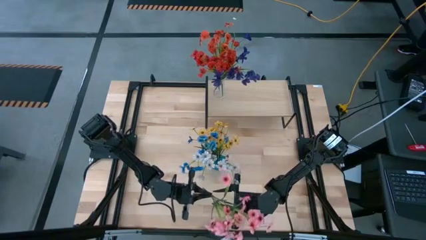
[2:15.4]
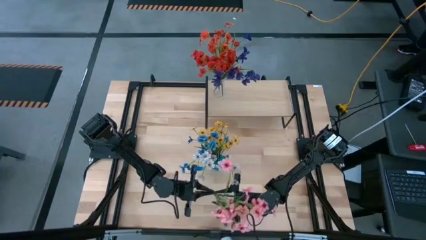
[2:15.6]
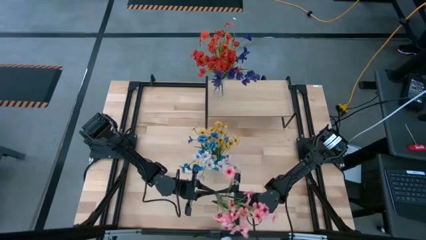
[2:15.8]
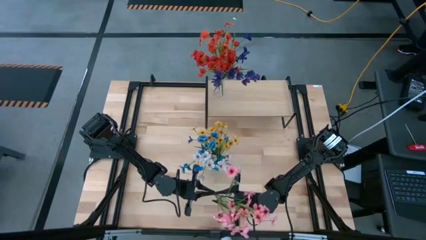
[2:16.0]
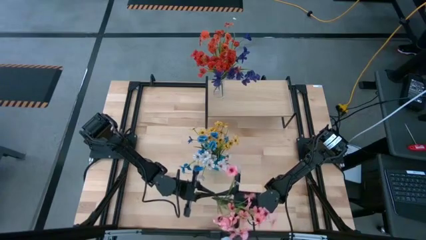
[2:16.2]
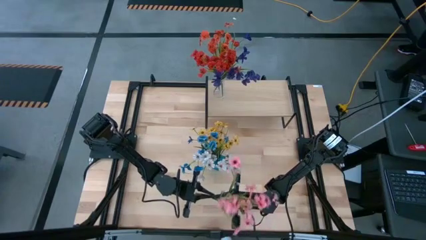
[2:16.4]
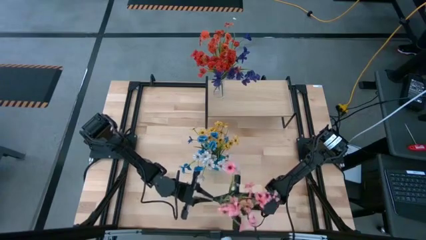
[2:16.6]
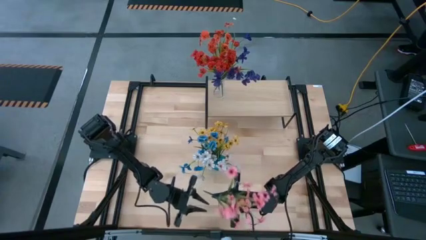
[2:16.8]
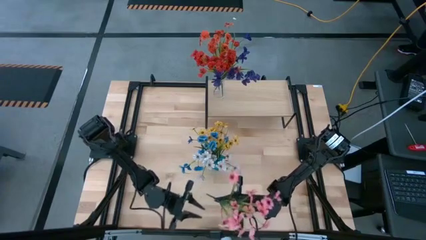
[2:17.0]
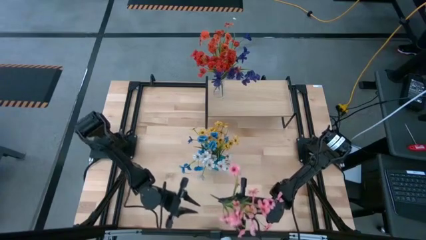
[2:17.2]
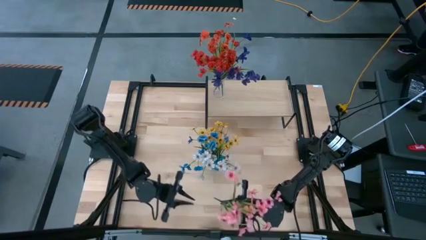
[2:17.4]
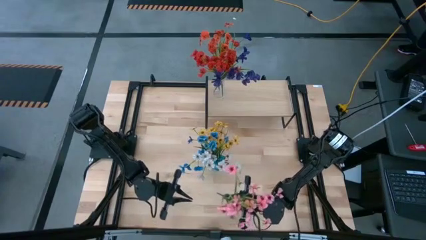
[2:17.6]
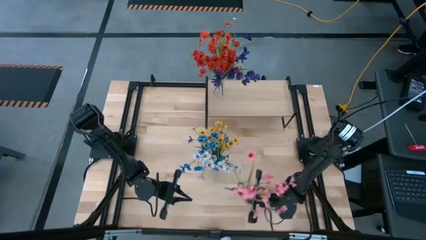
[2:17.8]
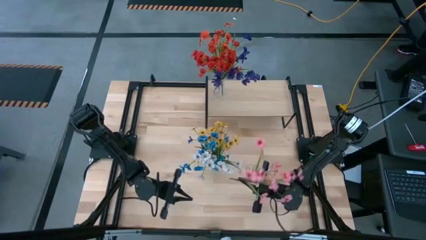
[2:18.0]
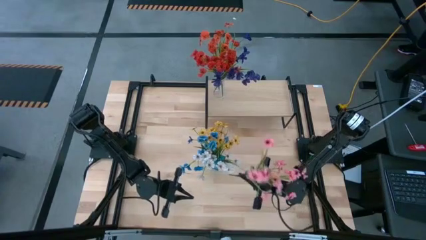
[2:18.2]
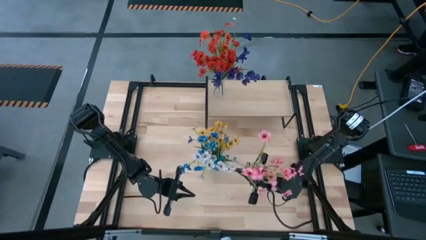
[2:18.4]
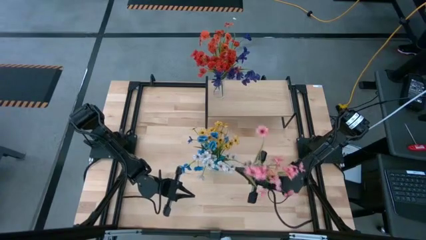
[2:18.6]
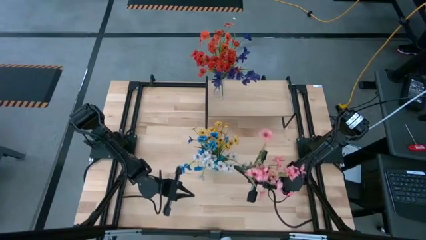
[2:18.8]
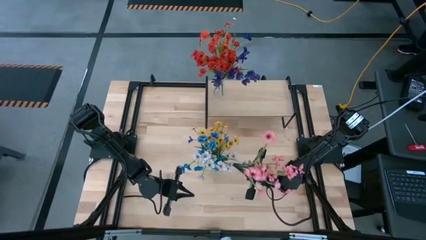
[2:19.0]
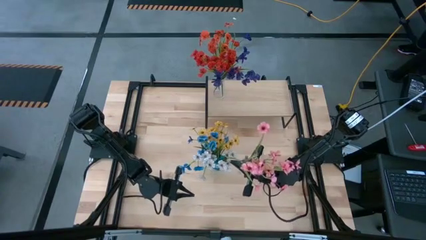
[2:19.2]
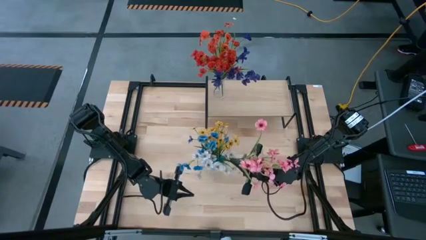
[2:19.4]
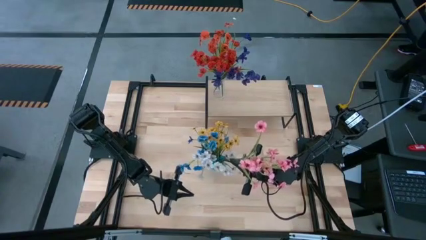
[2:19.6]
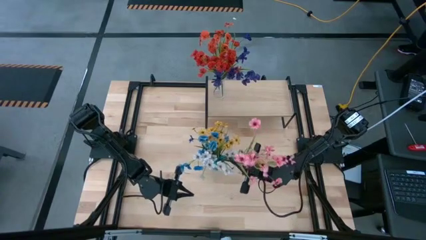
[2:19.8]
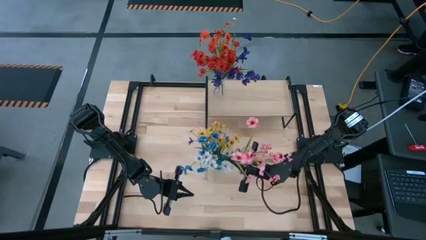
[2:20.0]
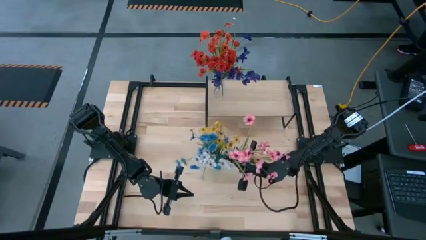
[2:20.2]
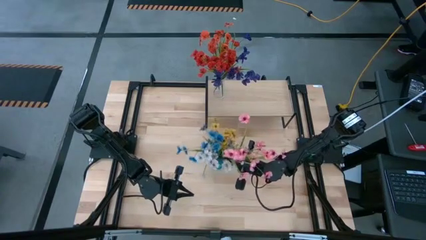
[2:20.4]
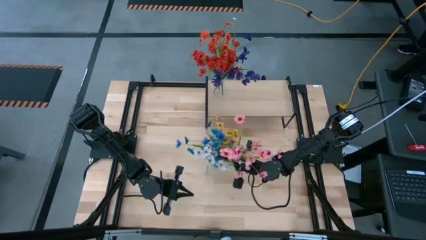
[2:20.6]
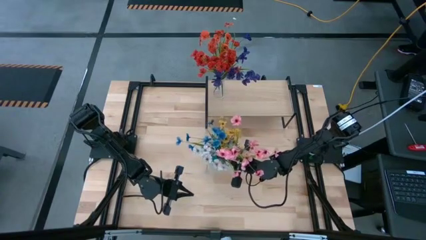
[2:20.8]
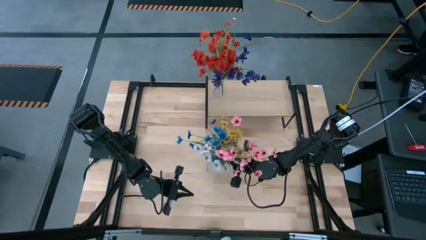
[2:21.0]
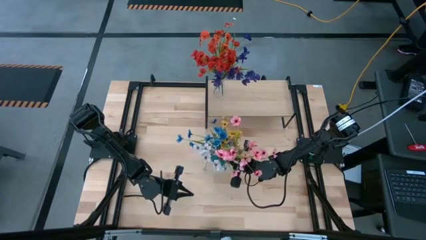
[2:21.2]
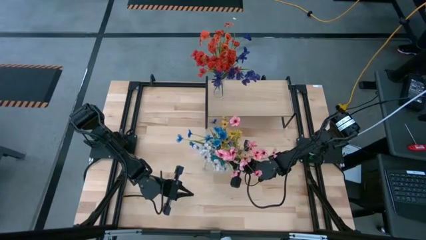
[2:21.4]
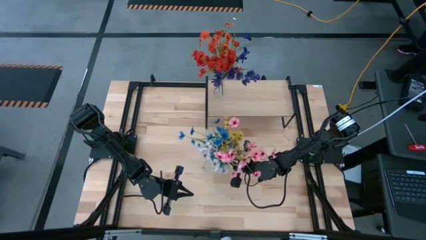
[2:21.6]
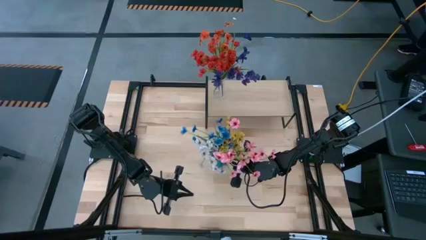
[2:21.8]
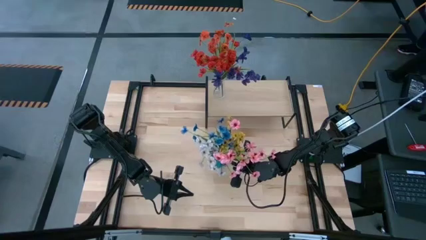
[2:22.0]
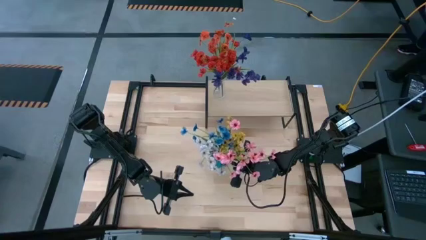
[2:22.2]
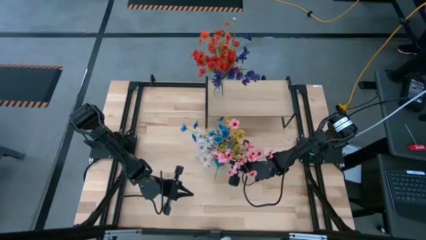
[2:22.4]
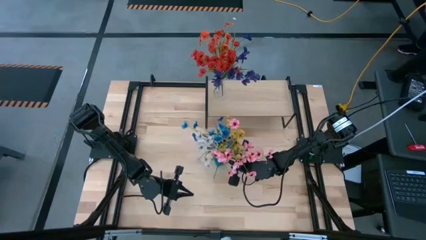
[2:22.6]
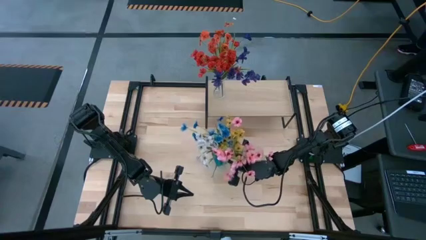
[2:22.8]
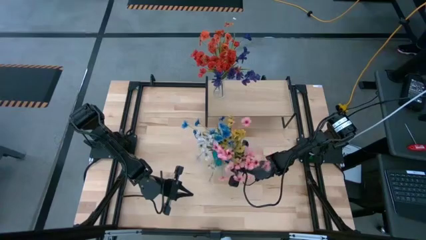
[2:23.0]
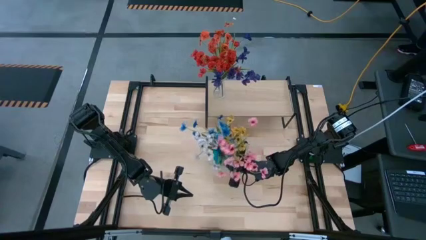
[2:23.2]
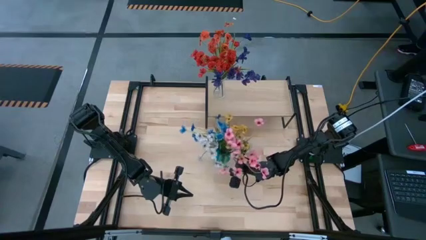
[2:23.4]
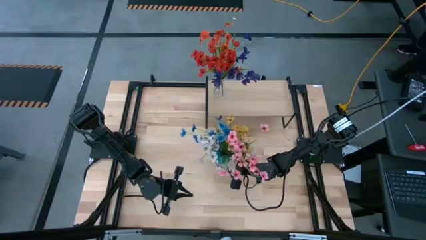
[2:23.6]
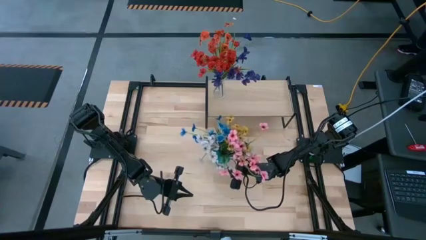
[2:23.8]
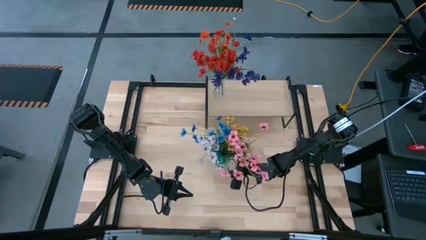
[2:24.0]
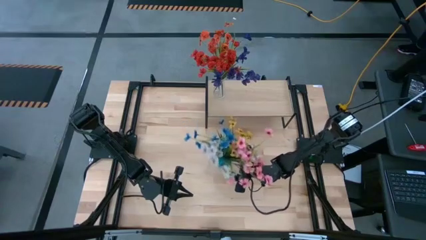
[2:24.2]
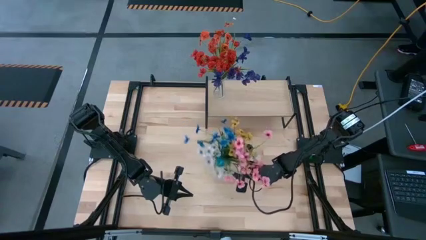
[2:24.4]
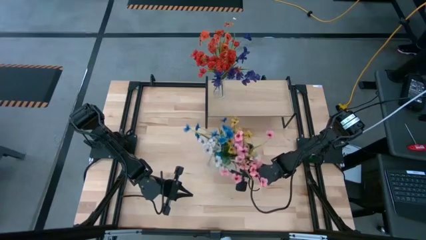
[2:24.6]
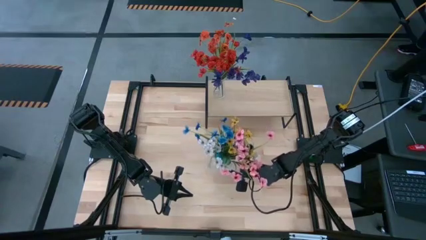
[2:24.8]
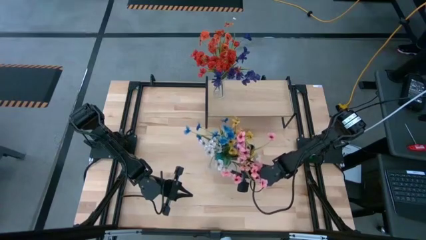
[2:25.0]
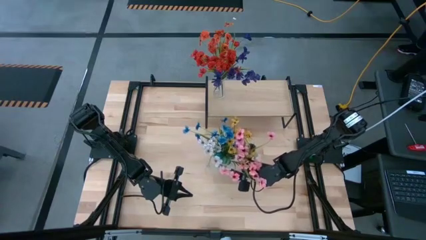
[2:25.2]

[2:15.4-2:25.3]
Task: Pick and place flowers into a vace then onto a shelf
Put the pink flowers into the blue vase
